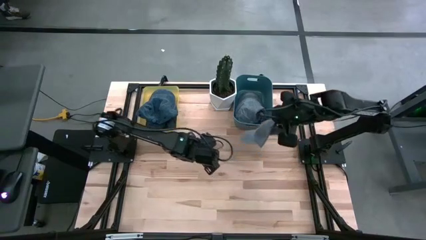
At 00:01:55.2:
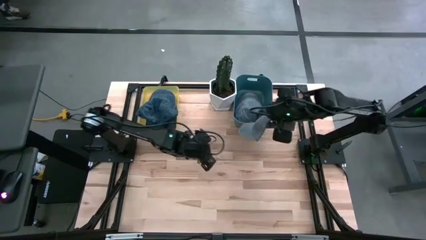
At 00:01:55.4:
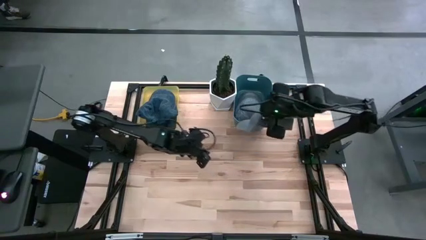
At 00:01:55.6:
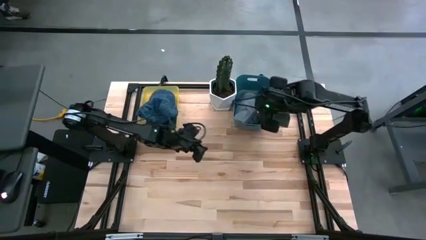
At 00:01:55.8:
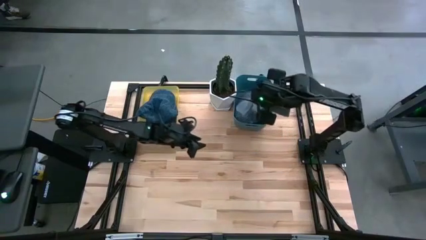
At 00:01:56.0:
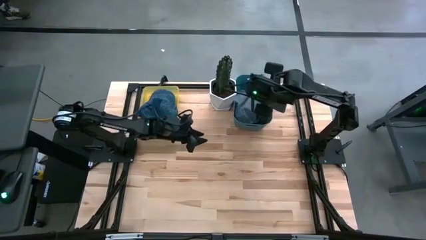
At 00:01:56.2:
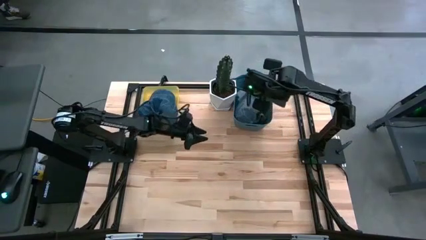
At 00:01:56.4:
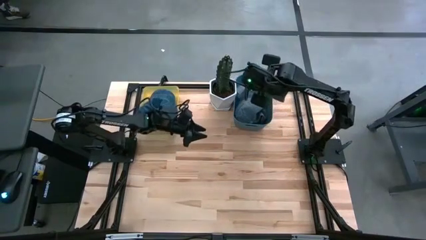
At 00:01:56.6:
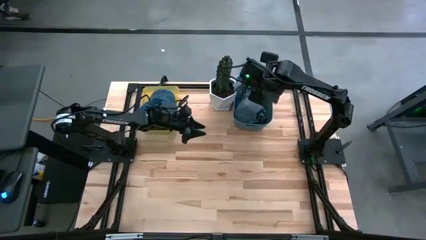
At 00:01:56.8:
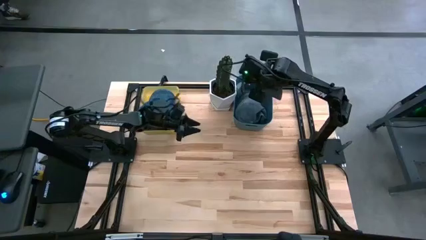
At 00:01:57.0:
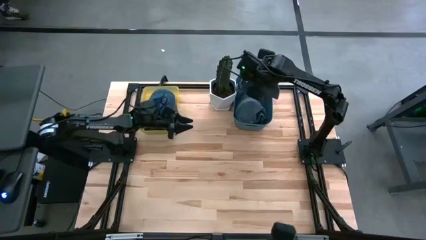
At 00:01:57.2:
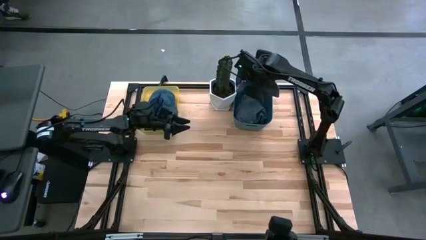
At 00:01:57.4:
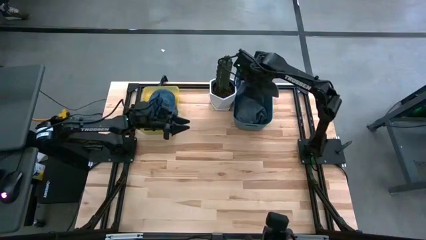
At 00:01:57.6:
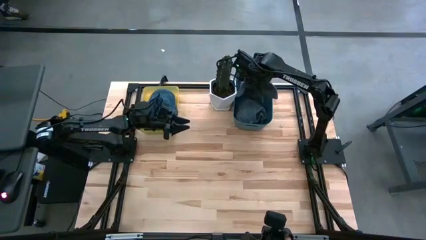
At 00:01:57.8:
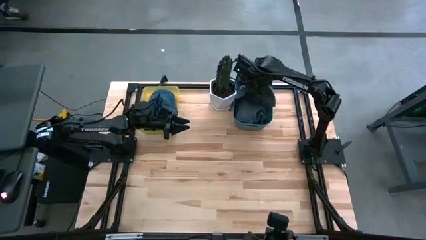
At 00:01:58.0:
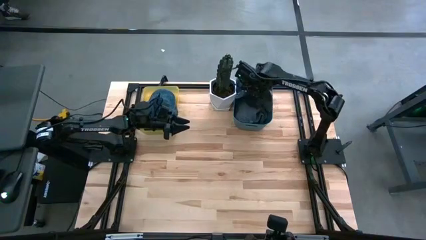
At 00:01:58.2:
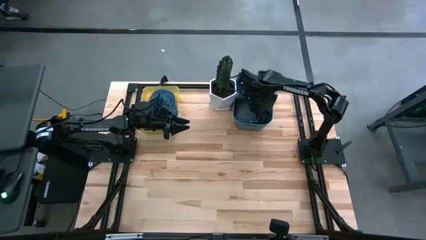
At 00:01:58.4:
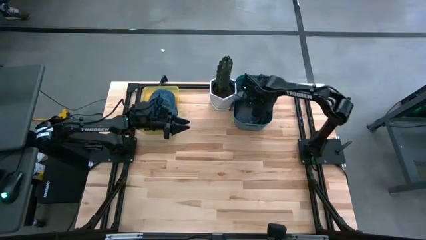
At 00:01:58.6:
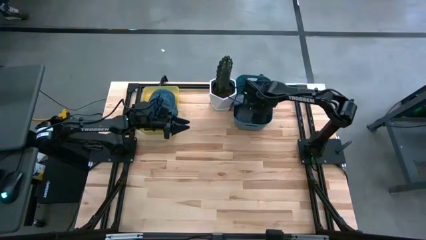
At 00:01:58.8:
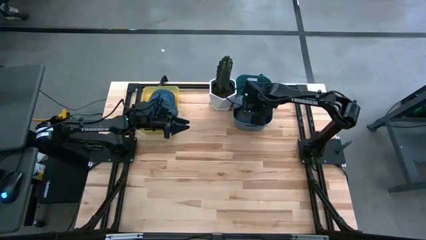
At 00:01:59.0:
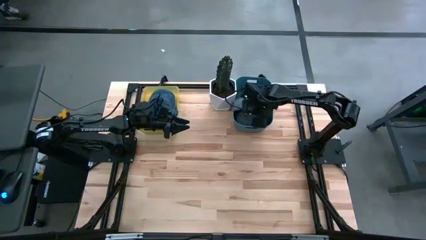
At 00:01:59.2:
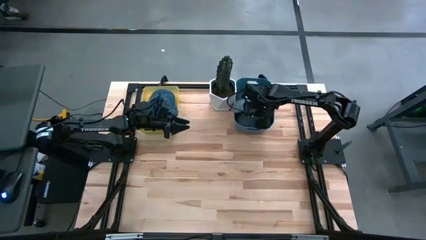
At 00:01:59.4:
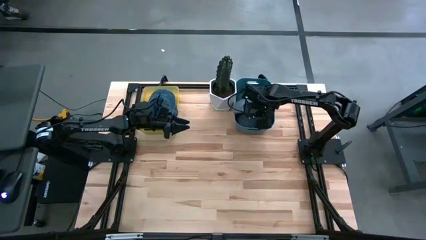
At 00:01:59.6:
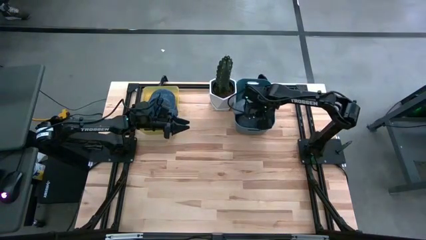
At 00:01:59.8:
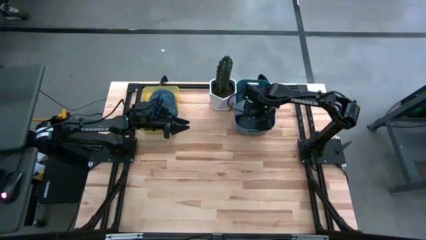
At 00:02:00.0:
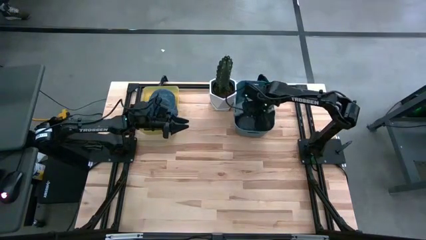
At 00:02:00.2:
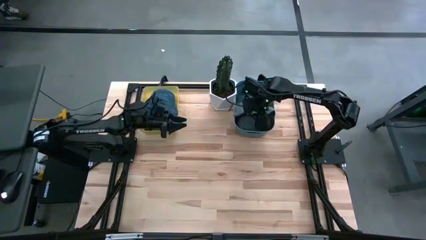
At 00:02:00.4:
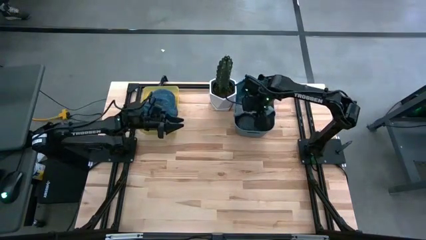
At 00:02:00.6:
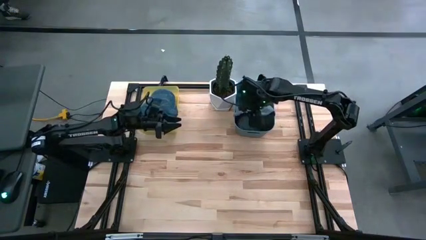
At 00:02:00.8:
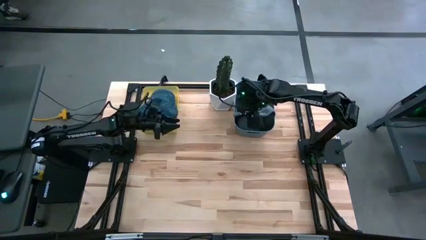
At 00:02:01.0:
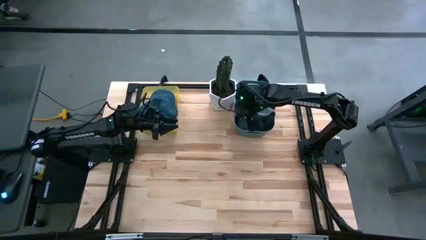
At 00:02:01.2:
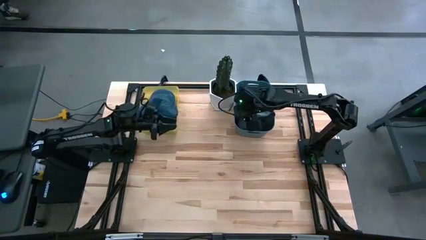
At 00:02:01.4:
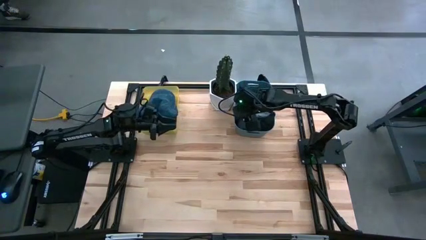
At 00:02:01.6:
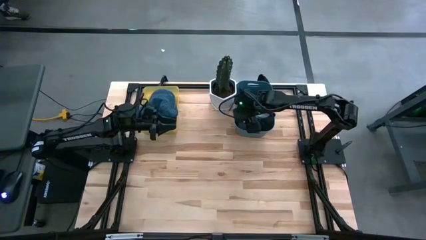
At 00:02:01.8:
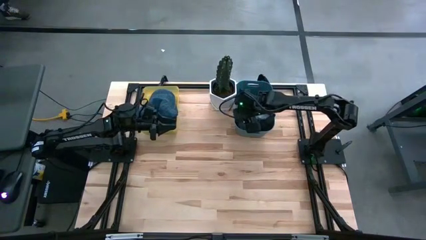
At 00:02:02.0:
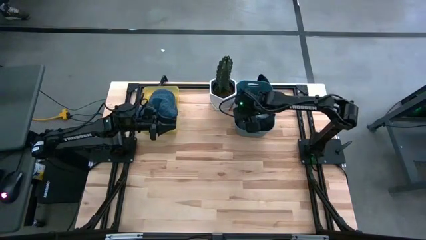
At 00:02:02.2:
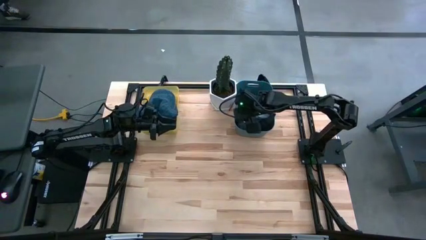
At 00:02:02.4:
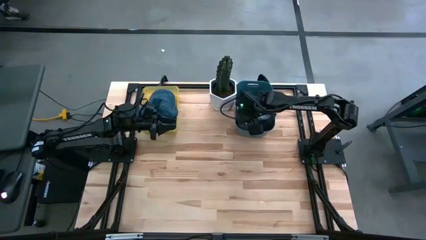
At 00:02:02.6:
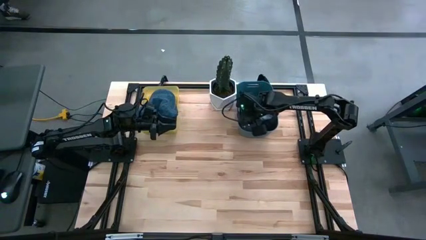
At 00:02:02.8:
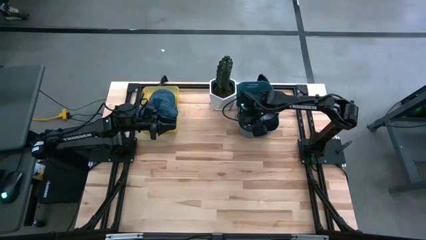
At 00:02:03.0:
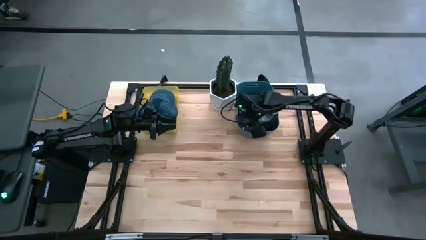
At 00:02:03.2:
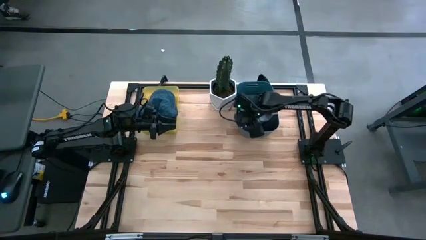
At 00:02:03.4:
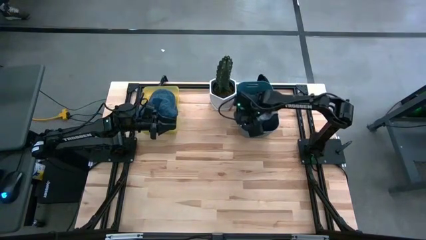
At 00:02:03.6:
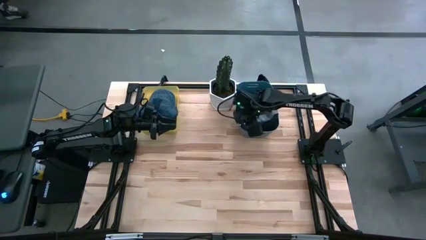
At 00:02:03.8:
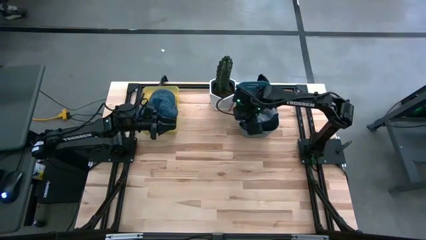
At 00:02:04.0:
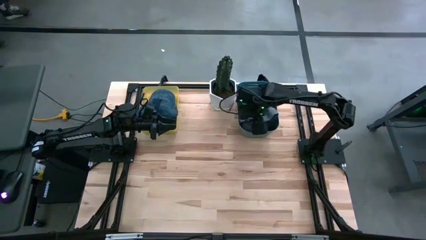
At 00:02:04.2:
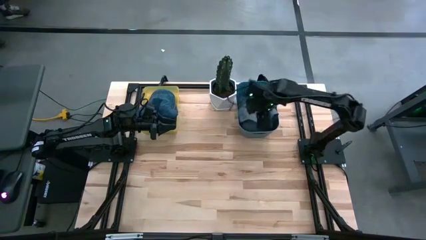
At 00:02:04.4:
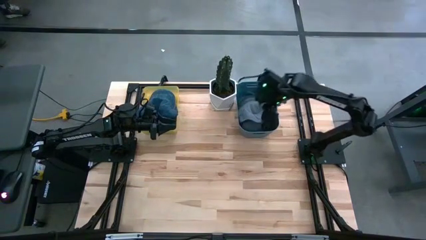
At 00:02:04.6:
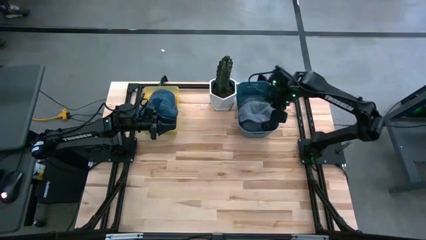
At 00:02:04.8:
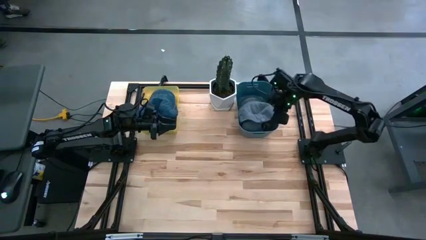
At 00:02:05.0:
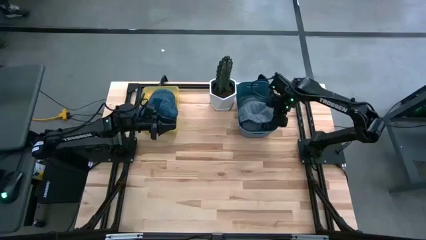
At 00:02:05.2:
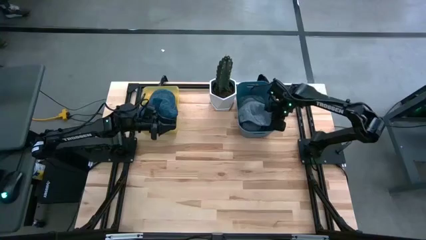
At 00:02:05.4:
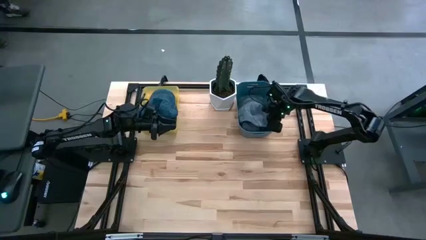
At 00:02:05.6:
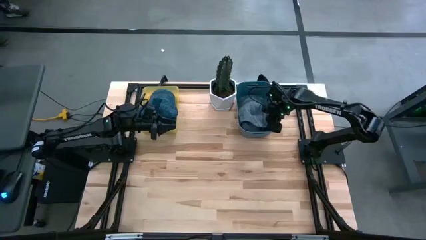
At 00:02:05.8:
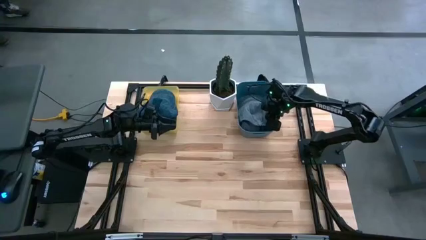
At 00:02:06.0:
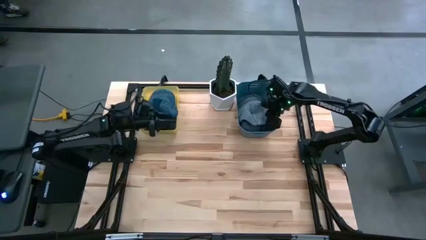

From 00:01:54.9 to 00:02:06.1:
Task: Pick & Place hat
Put the gray cap into the blue bin

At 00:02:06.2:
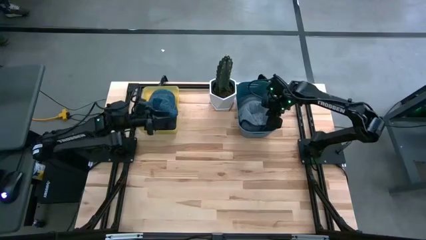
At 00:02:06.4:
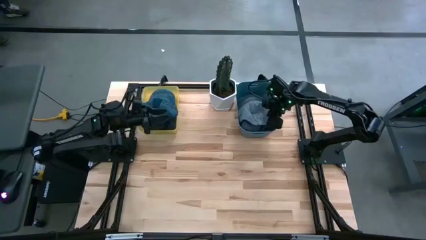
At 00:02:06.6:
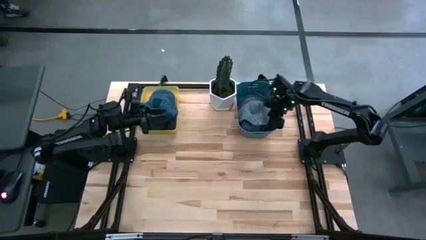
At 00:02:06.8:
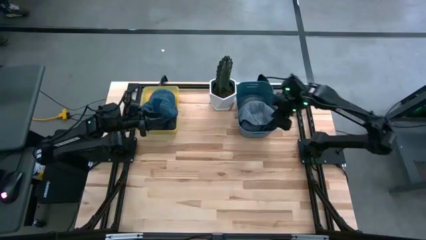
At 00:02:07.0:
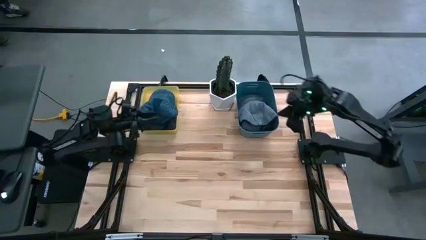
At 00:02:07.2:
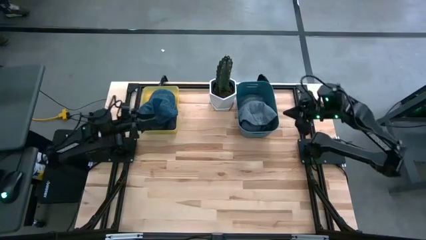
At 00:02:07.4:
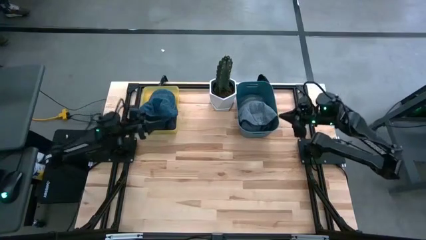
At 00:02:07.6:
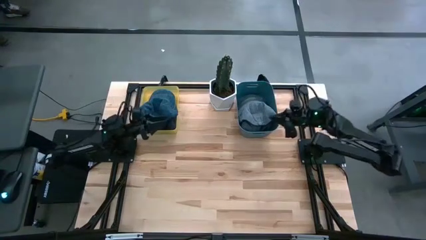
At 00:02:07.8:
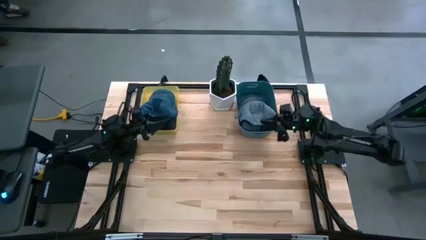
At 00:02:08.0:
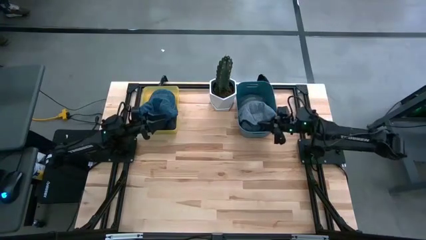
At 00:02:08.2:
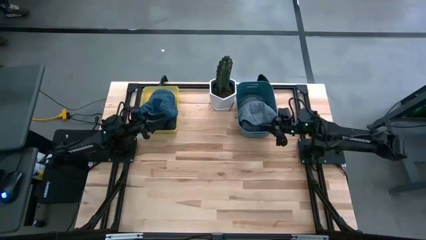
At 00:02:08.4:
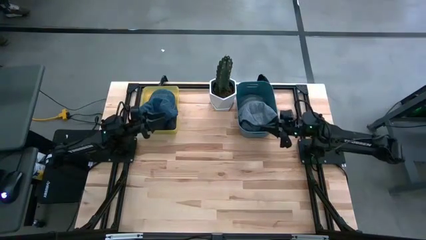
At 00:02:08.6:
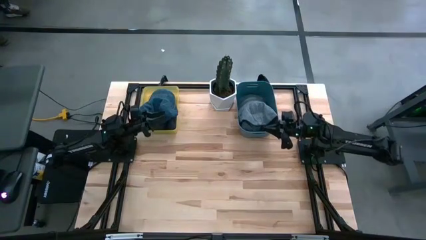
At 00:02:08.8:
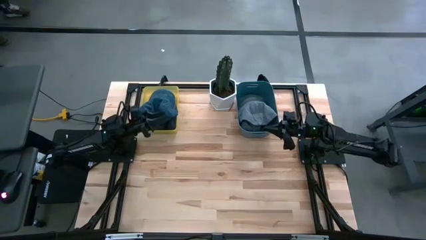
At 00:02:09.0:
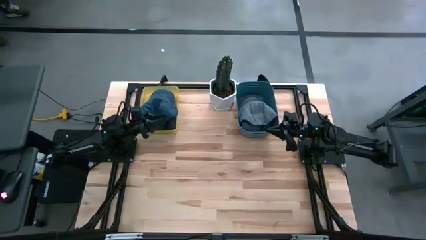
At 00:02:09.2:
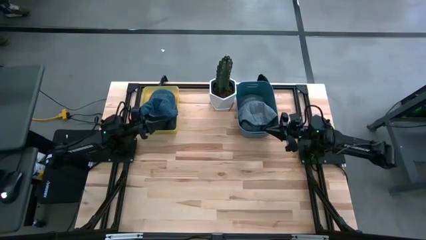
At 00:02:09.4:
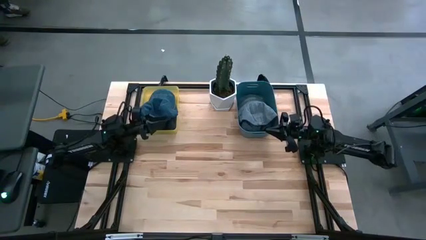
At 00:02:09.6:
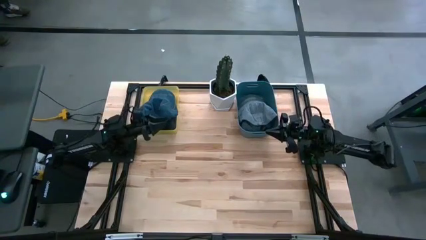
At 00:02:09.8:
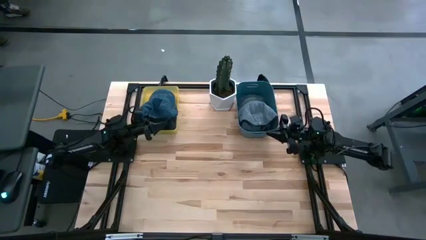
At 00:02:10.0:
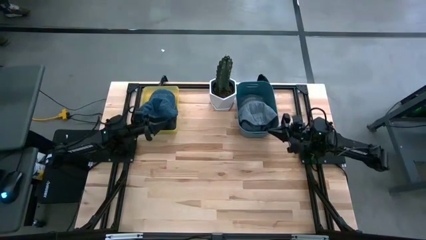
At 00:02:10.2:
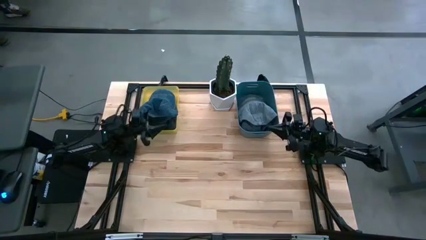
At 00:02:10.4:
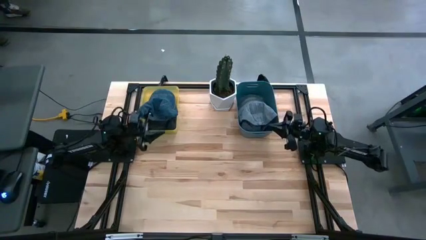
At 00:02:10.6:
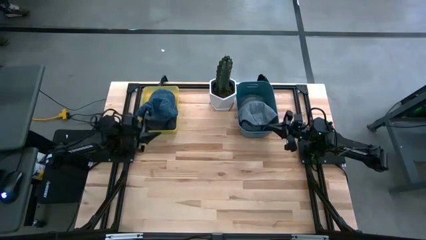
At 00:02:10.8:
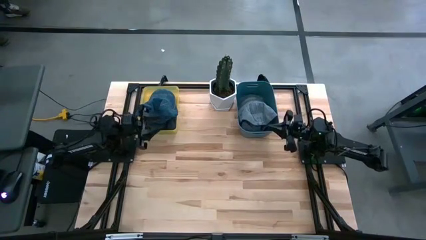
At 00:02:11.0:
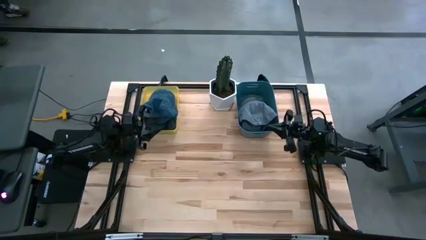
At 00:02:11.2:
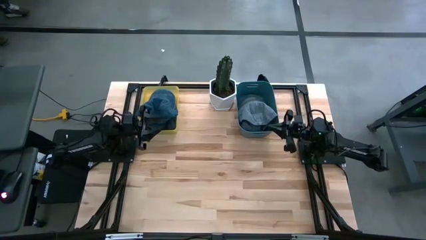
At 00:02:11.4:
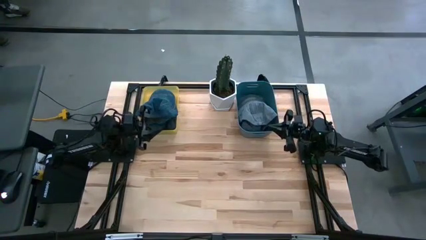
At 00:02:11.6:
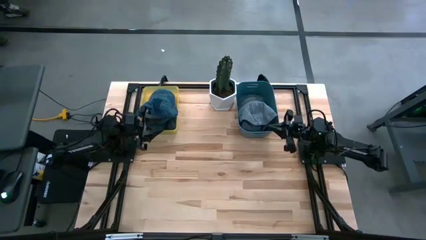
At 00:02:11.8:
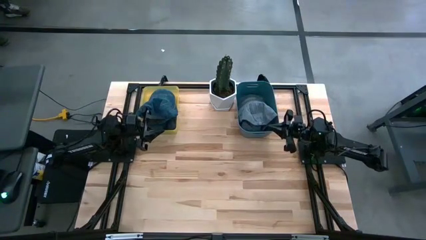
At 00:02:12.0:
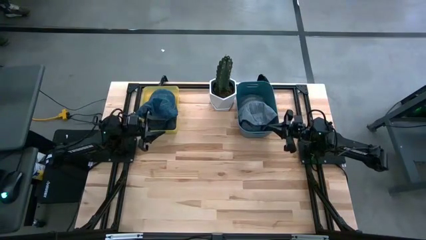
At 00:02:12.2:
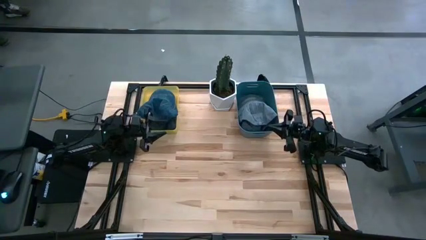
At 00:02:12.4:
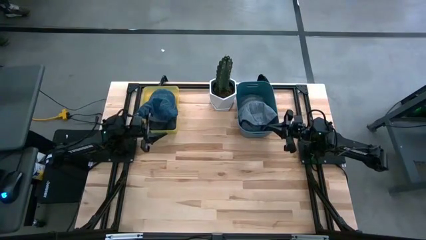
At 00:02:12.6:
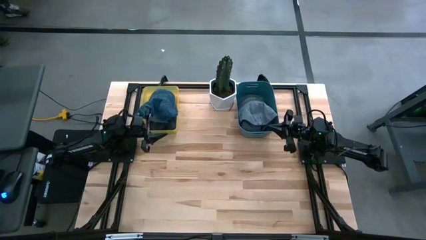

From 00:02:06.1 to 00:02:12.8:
Return to Home Position
